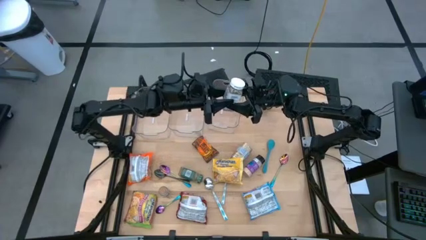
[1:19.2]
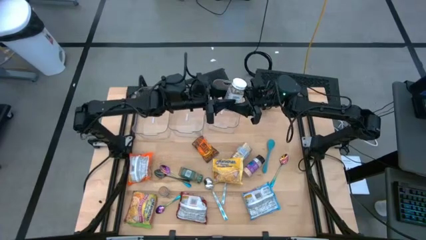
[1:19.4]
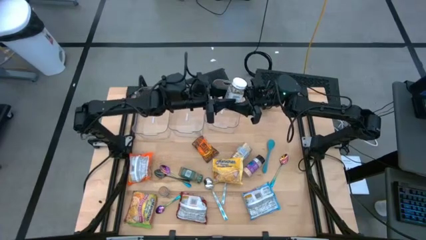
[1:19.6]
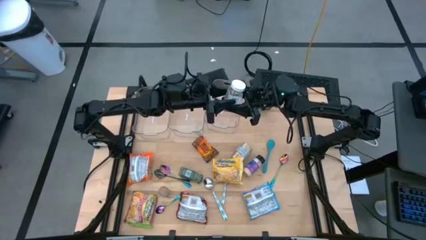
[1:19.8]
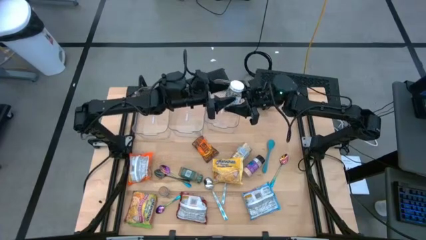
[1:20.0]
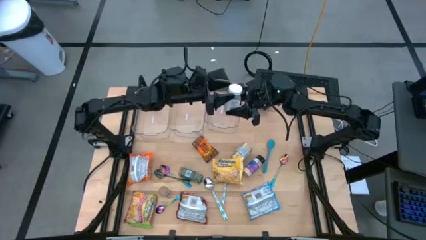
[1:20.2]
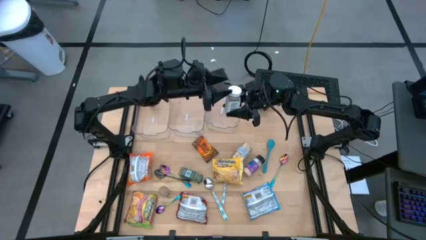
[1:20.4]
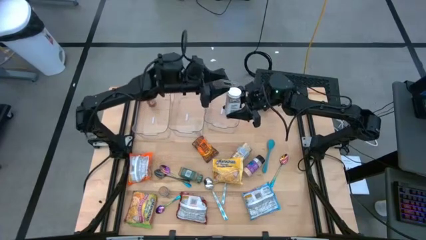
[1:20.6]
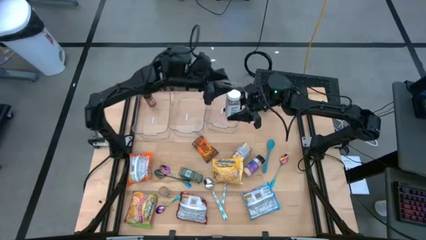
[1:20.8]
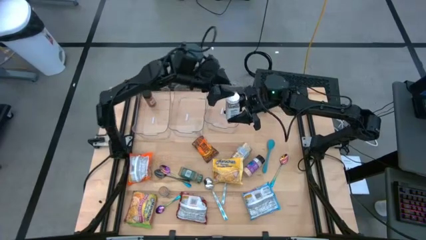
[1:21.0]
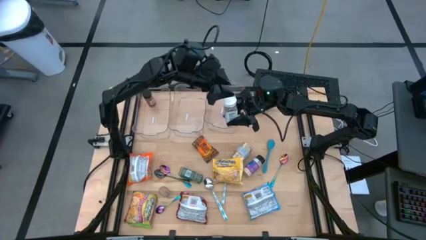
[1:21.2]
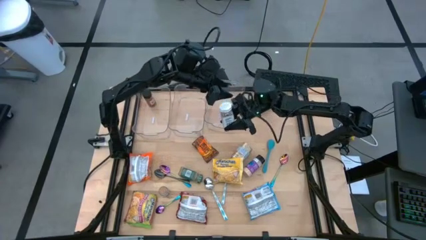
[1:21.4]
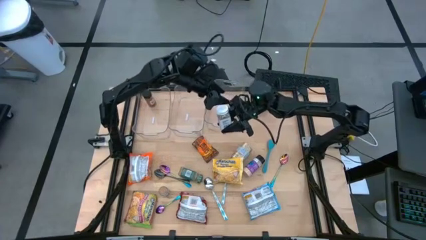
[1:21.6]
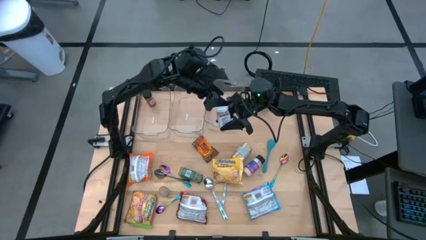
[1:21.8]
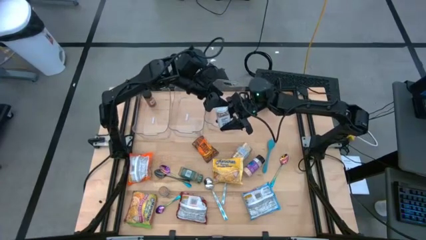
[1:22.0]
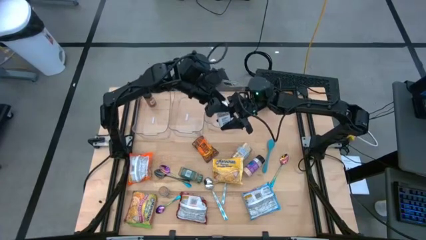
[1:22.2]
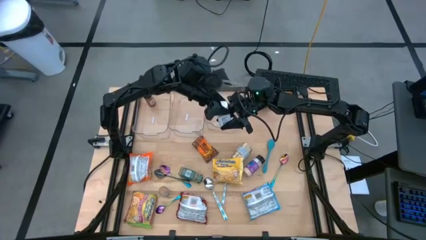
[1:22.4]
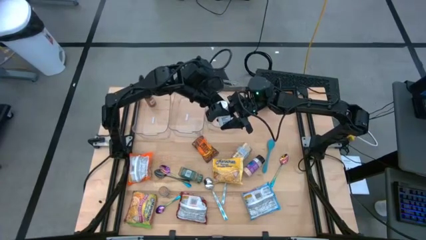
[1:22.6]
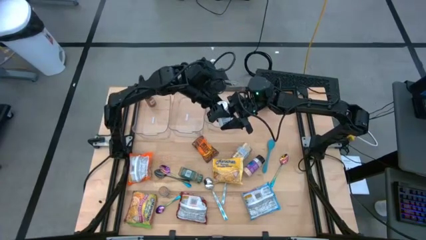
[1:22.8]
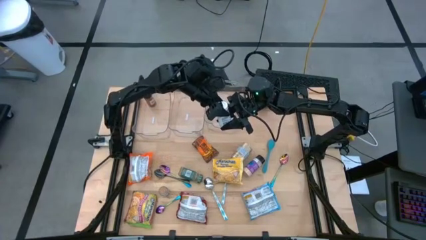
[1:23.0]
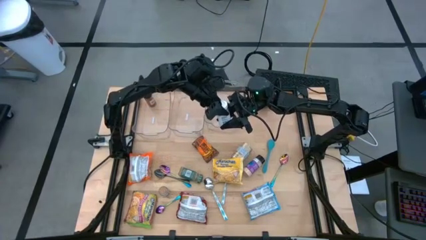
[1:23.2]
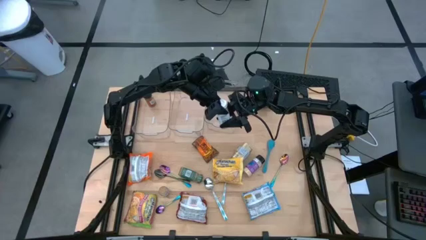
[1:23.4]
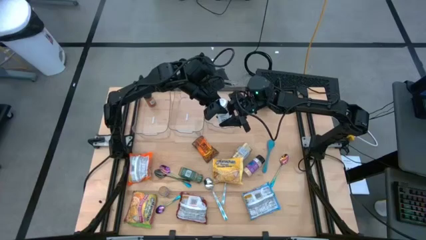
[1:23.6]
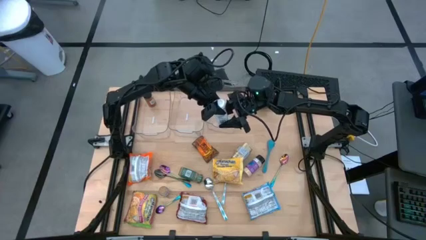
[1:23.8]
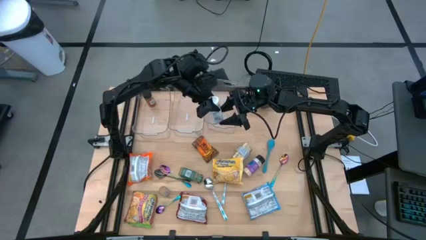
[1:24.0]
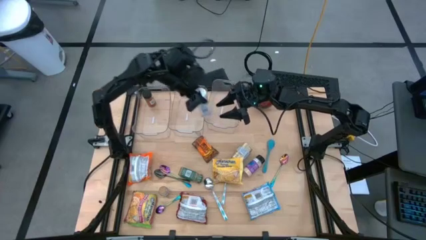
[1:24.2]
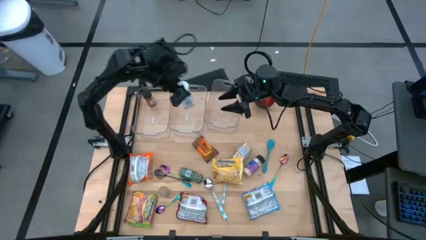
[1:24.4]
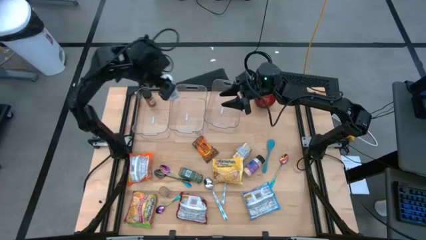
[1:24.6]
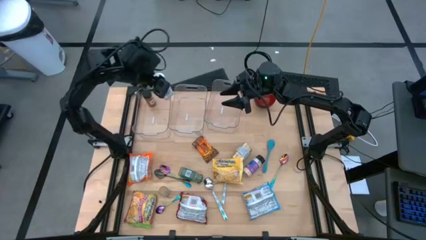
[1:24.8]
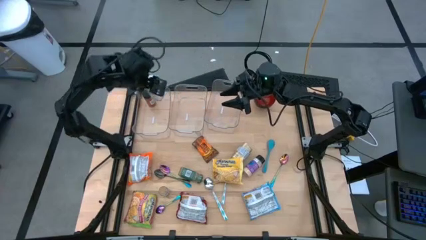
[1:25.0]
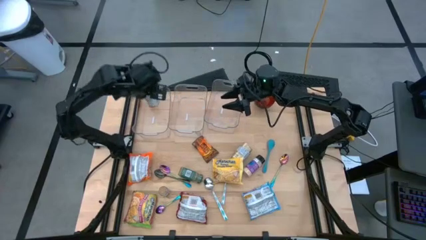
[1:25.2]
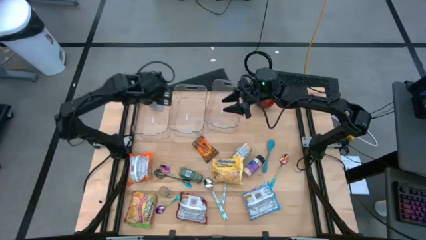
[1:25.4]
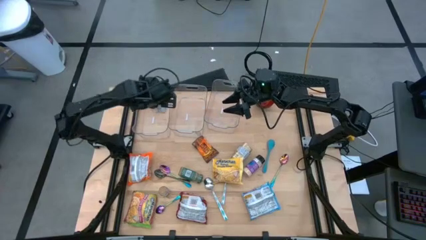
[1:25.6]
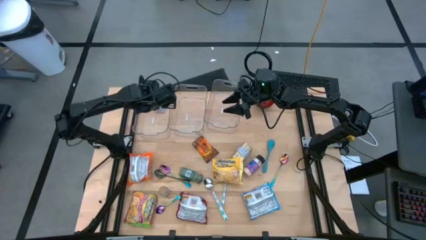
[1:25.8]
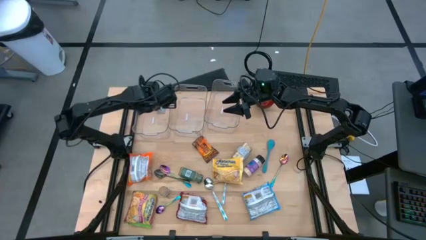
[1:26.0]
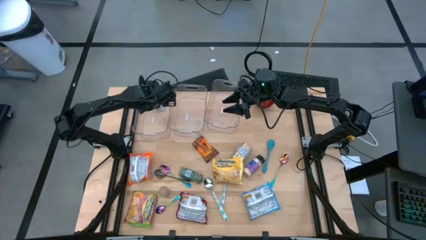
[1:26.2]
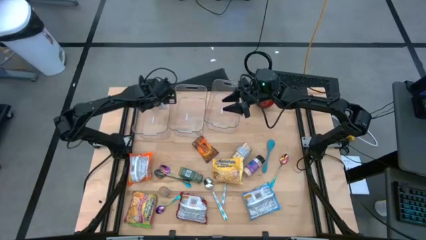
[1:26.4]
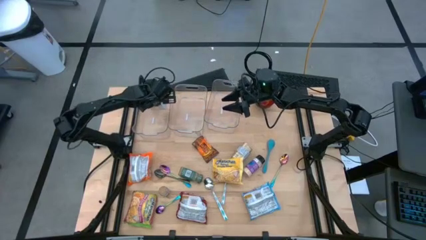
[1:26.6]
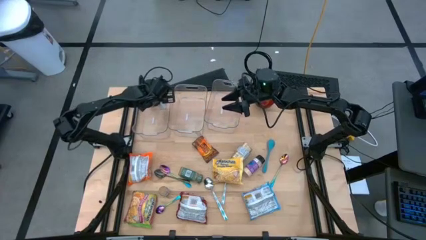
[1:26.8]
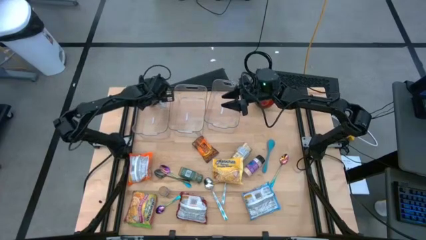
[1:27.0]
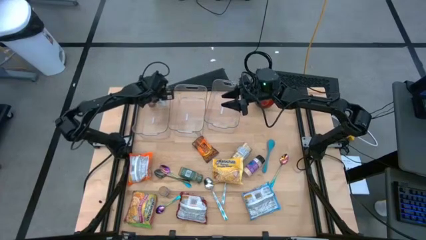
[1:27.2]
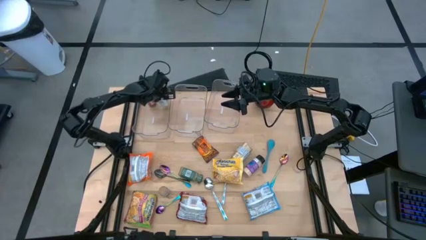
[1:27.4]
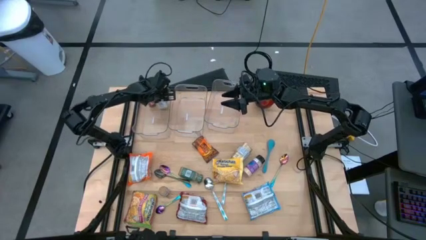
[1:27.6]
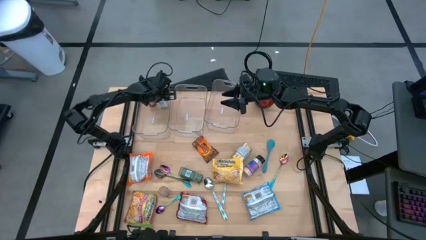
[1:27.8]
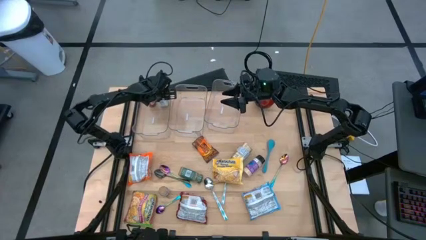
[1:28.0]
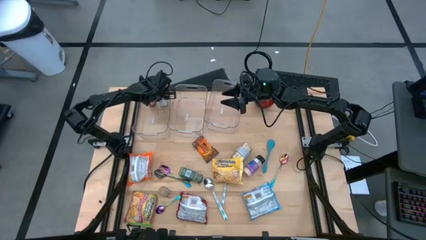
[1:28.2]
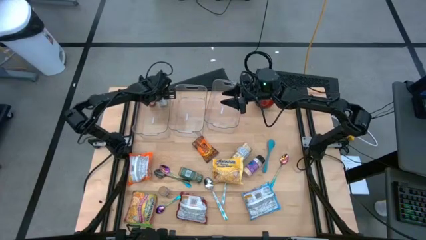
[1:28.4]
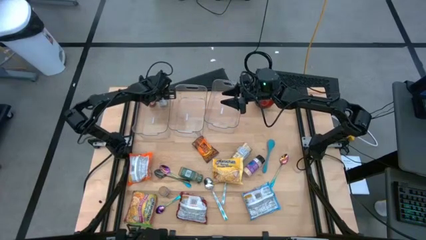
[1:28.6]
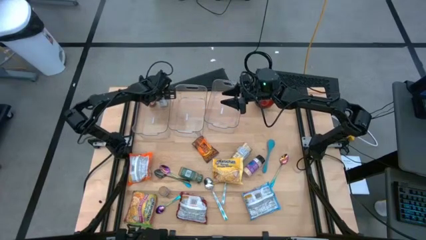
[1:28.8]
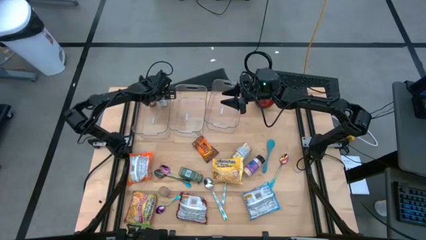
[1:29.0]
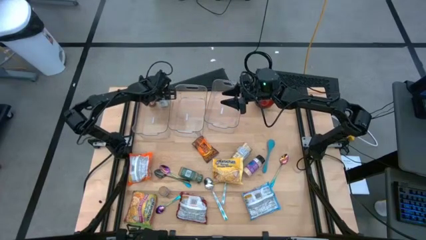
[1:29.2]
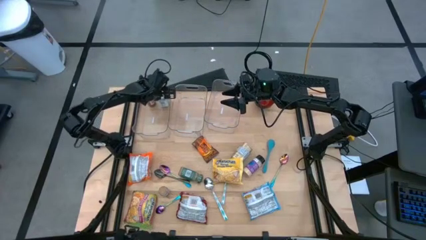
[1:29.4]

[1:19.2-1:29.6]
Task: Pick & Place Food Item
Put the white spice bottle into the left transparent bin

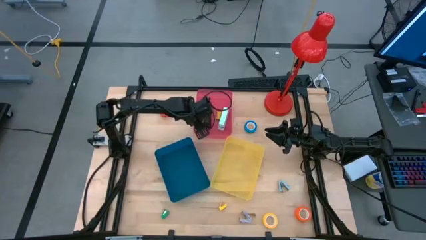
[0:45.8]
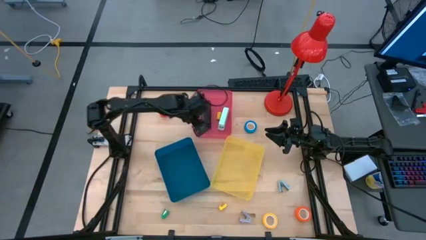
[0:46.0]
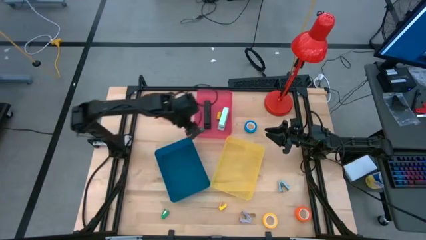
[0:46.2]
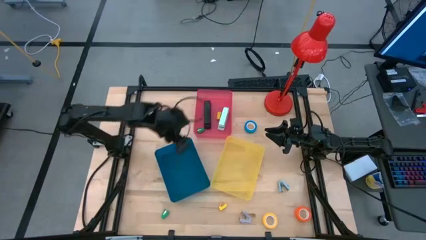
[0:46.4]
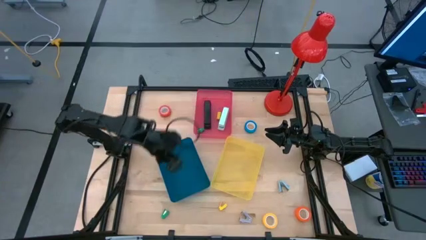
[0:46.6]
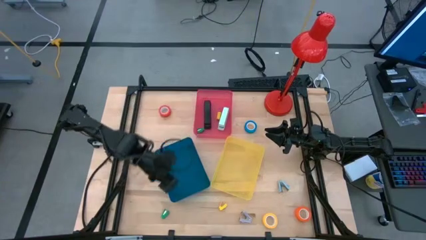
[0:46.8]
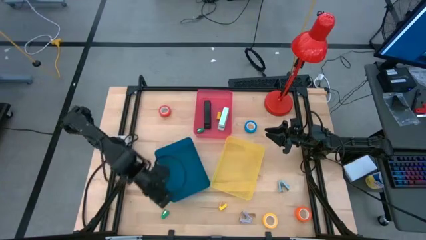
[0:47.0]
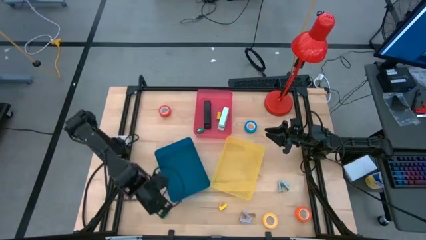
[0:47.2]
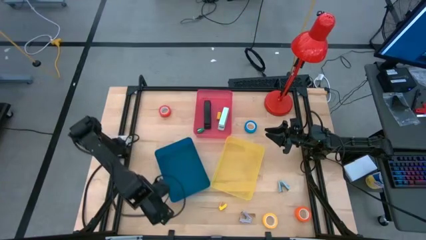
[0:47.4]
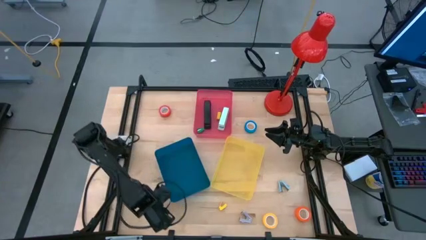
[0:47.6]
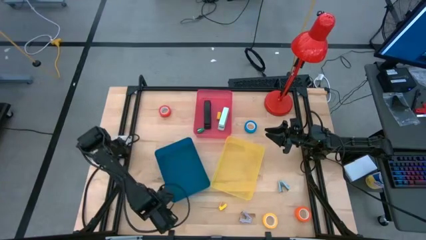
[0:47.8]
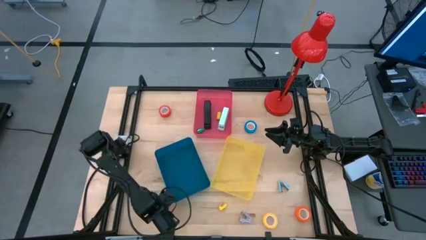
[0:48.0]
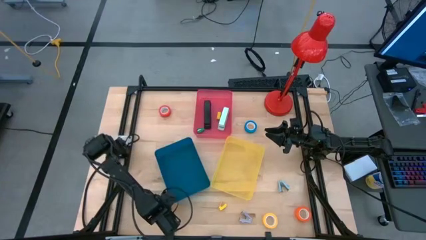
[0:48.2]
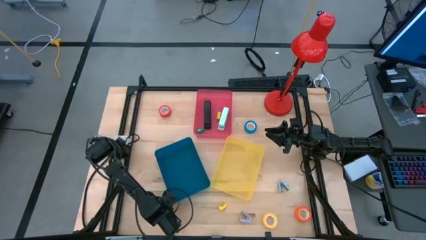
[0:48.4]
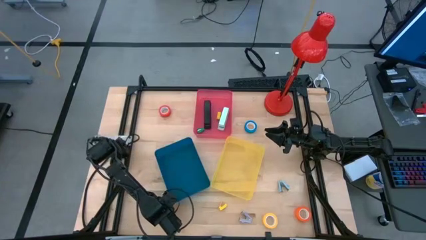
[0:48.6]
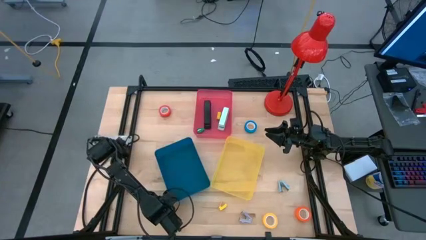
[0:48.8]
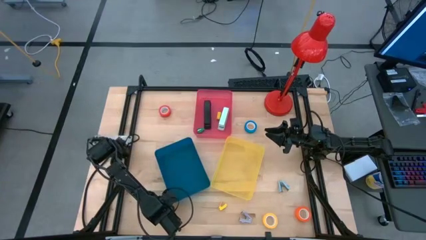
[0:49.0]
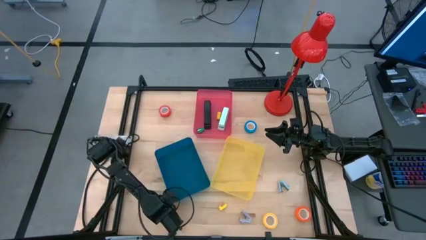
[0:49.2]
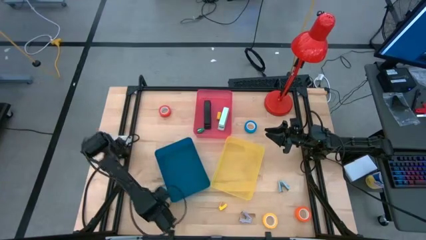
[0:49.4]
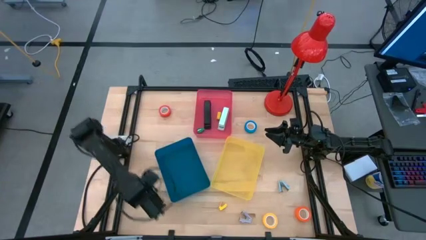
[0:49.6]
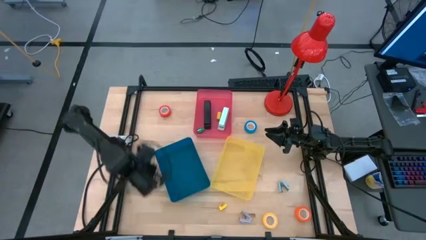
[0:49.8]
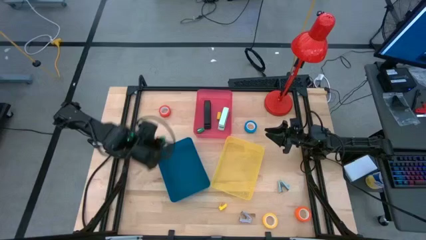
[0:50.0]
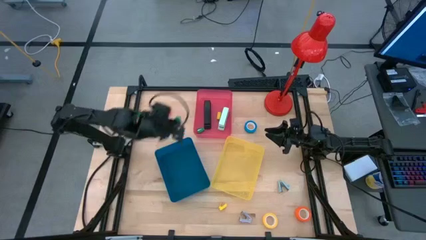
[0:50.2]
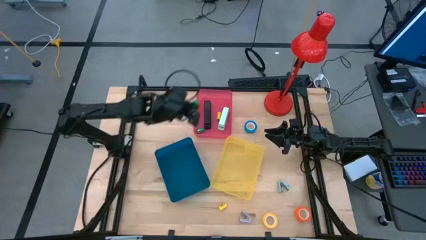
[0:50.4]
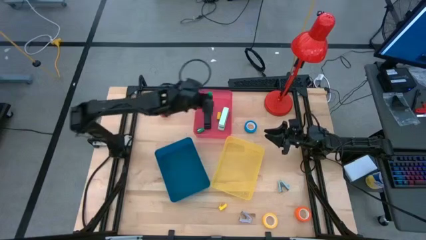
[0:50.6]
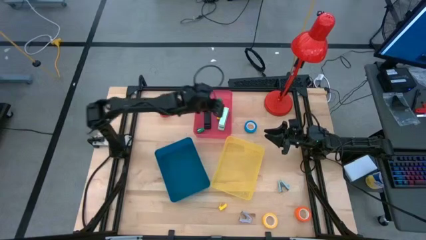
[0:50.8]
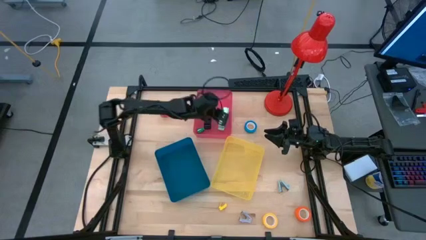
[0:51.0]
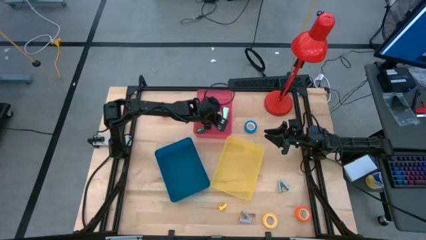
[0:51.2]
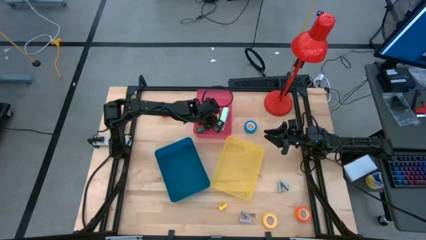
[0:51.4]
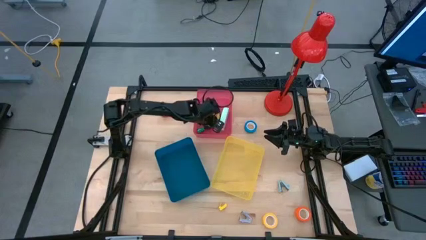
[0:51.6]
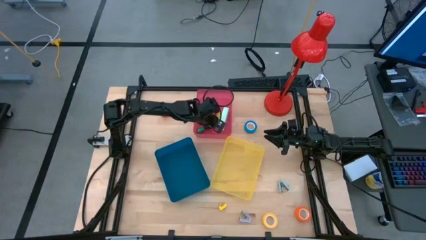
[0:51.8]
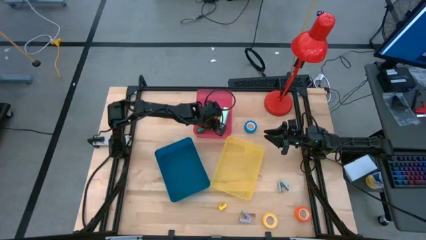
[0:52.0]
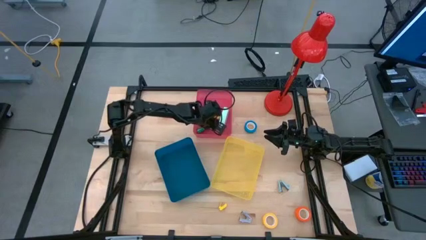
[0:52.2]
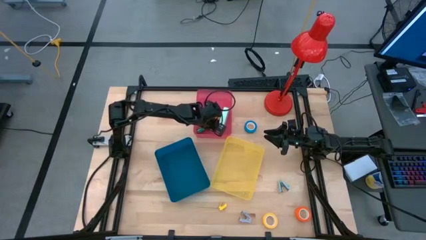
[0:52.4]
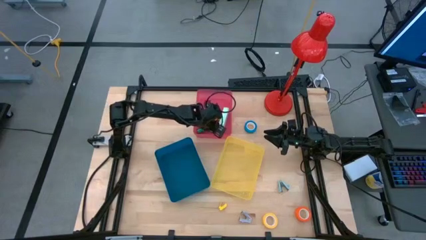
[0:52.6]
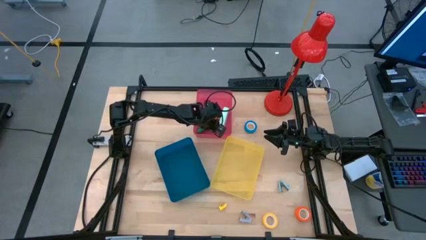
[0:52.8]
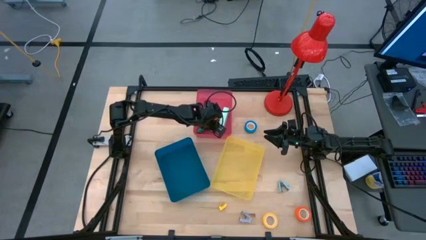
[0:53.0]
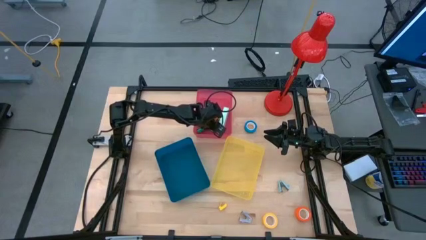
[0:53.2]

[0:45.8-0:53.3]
Task: Pick and place Stapler, Stapler remover, tape
Put the small green stapler into the red bin
